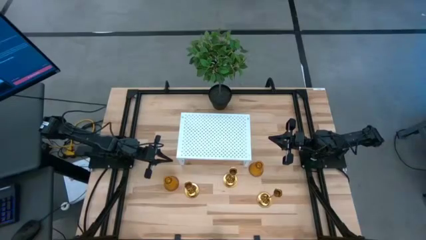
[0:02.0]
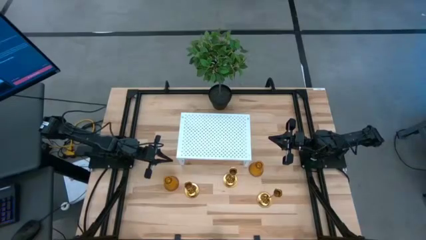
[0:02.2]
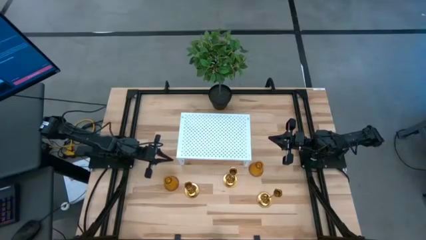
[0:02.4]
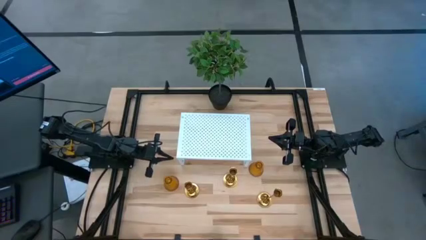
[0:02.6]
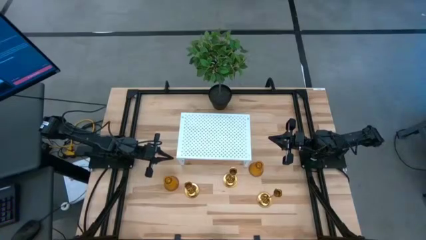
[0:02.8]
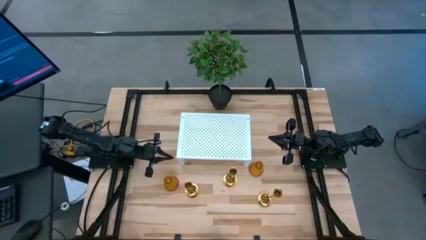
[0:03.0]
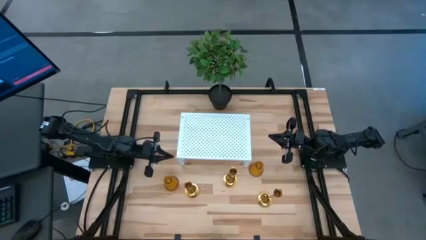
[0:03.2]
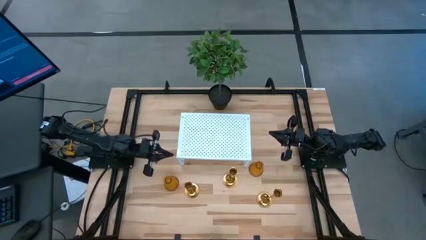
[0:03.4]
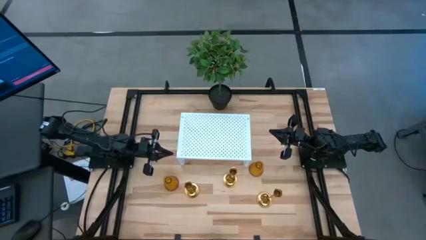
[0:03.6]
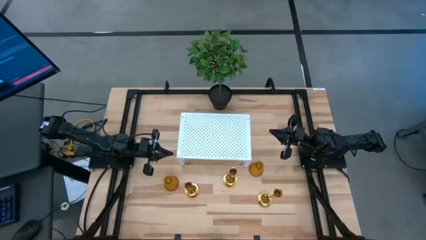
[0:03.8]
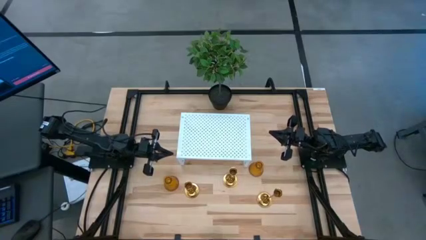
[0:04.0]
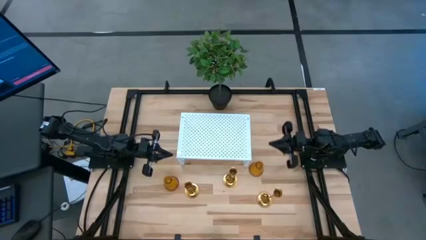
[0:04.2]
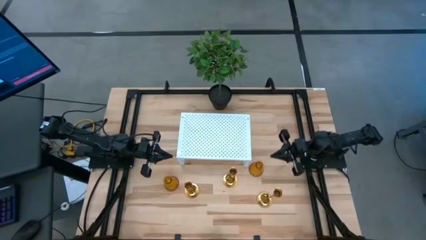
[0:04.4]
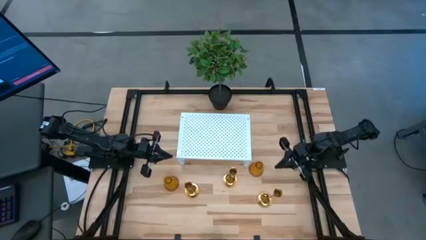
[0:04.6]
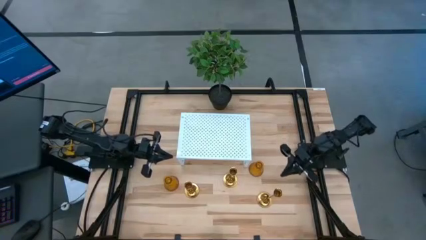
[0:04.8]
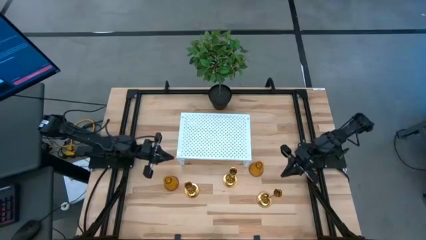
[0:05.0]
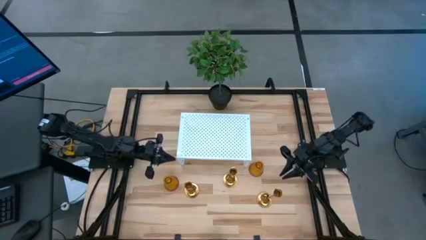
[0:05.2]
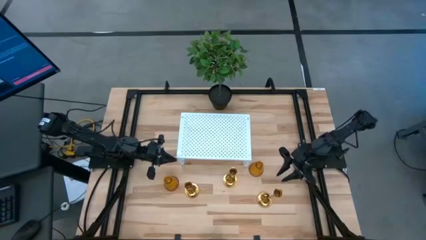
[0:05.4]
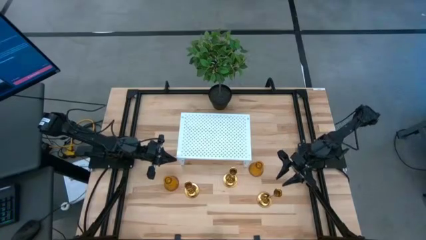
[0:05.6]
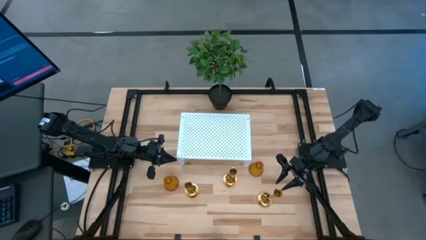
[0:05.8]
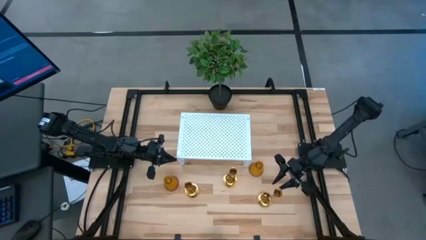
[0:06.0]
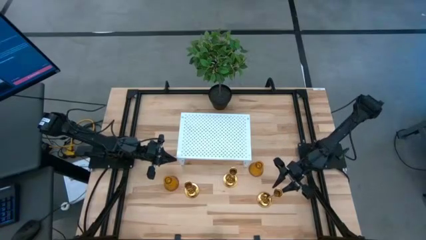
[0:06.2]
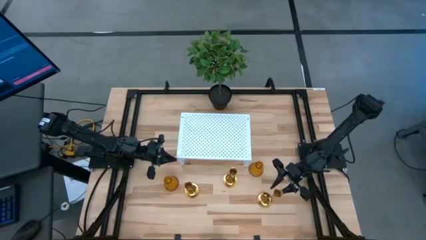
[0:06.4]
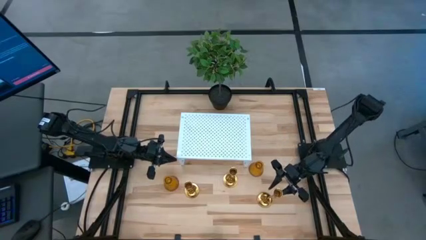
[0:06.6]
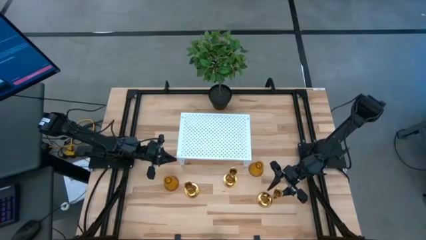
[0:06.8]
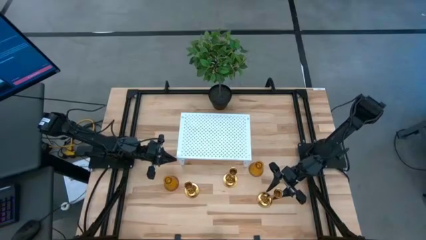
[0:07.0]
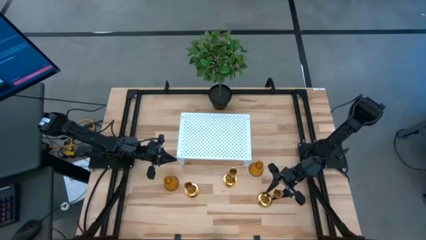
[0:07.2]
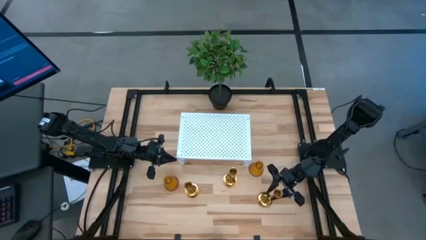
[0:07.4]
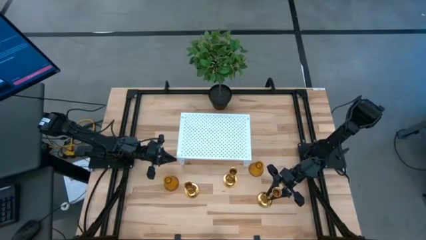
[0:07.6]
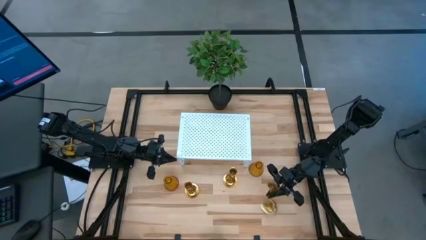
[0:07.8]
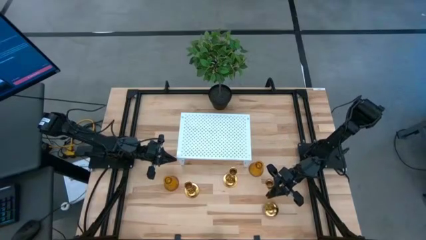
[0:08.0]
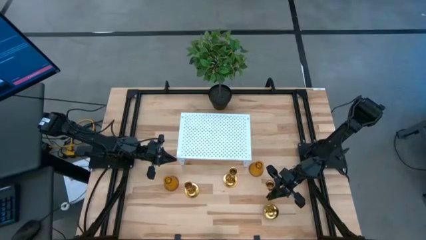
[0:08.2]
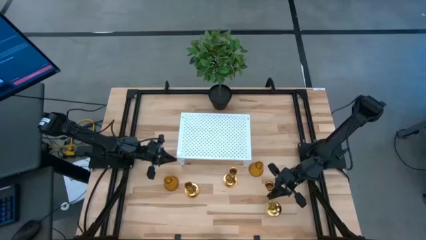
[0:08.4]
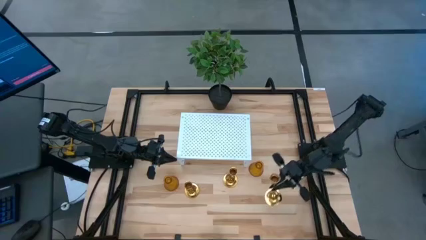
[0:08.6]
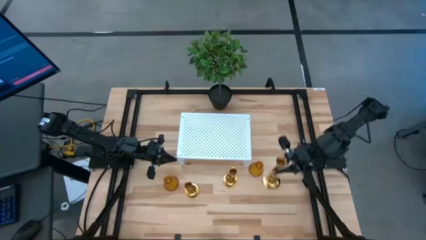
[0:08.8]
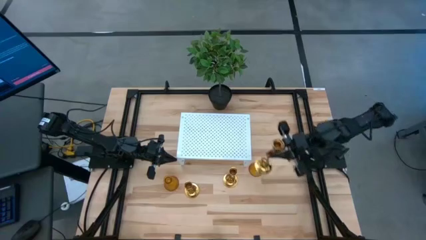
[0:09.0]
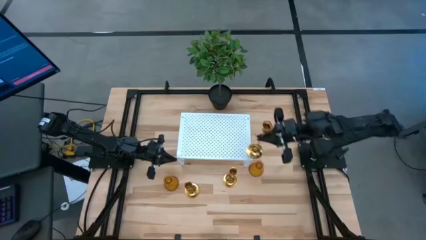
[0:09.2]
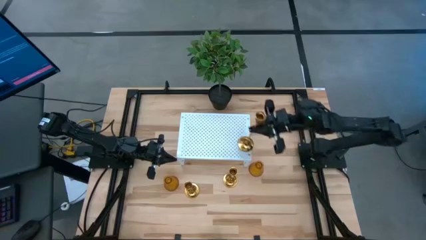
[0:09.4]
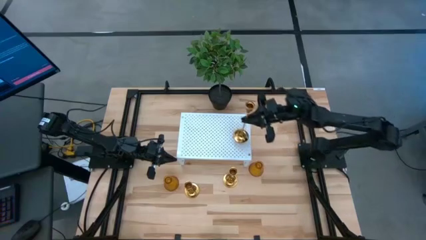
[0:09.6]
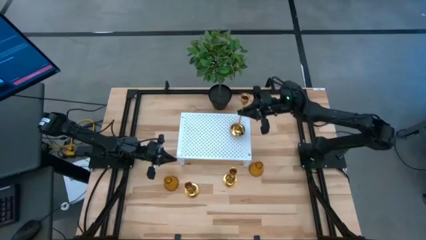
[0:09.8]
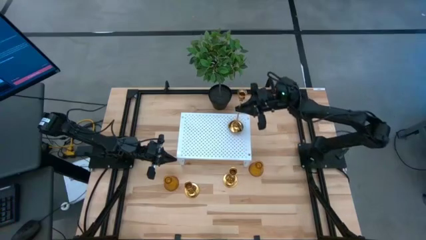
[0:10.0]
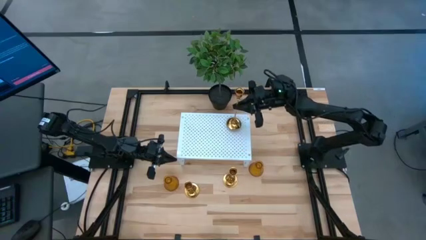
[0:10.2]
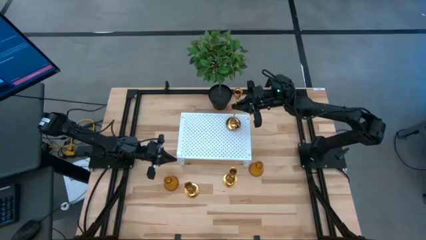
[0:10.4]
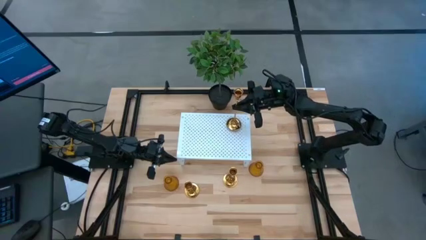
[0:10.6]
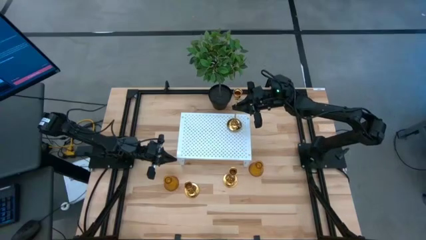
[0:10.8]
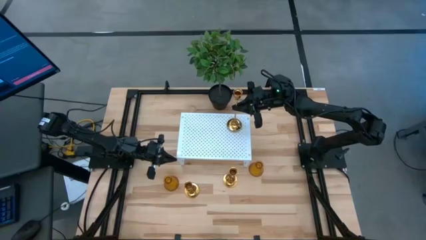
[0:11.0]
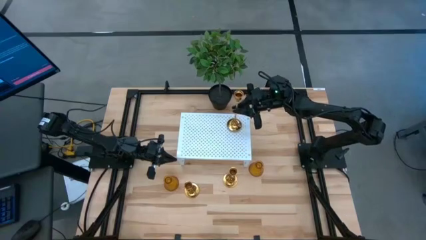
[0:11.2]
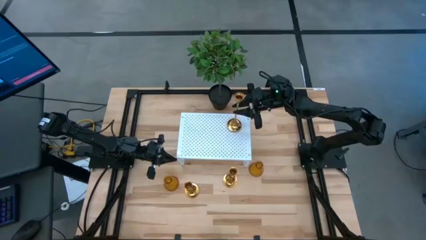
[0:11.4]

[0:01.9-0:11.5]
Task: Pick & Place candle stick holders
Put the bottom right gold candle holder on the shelf

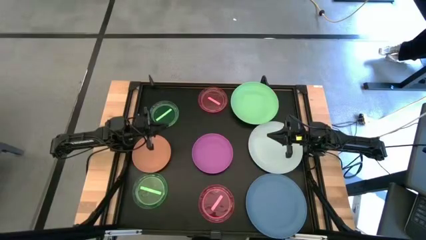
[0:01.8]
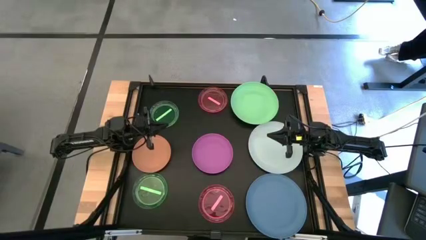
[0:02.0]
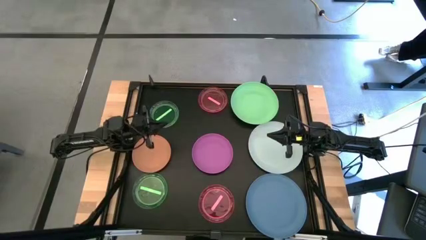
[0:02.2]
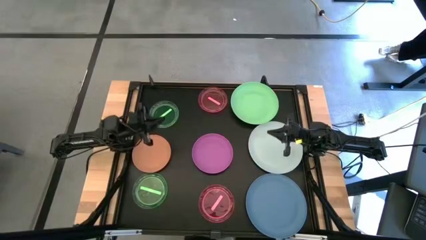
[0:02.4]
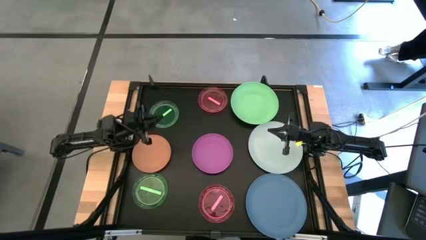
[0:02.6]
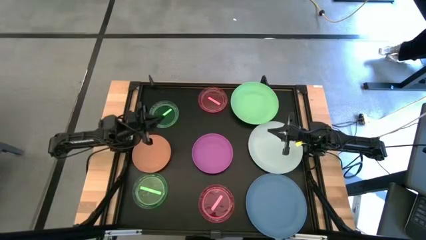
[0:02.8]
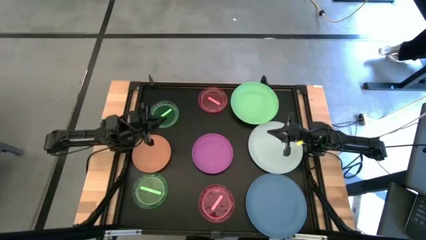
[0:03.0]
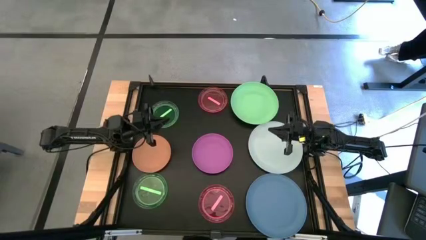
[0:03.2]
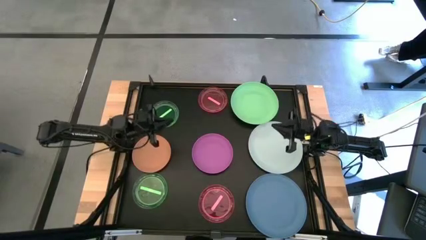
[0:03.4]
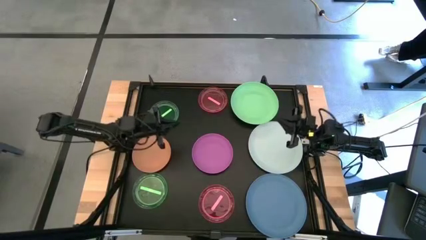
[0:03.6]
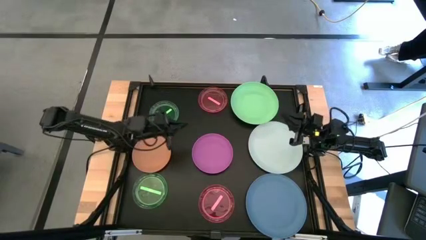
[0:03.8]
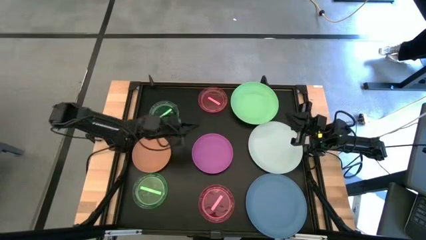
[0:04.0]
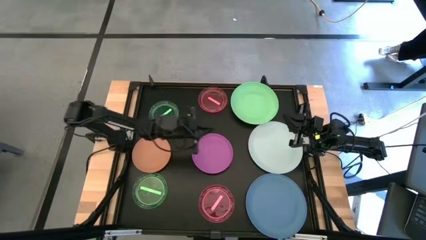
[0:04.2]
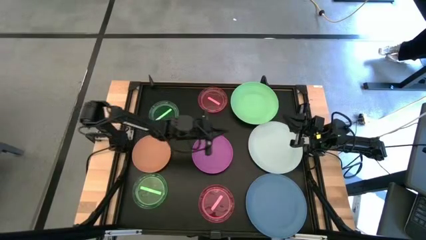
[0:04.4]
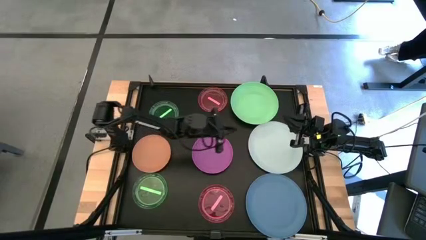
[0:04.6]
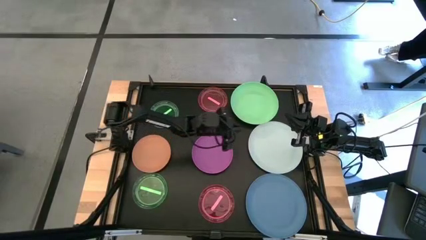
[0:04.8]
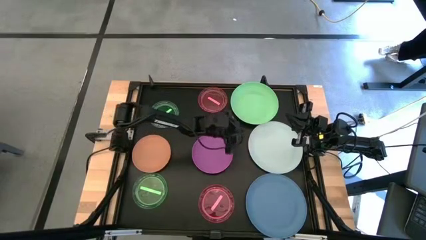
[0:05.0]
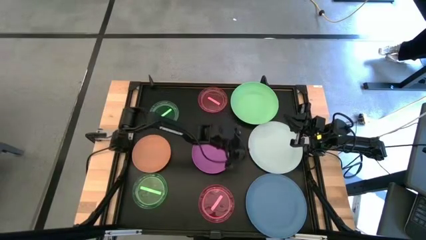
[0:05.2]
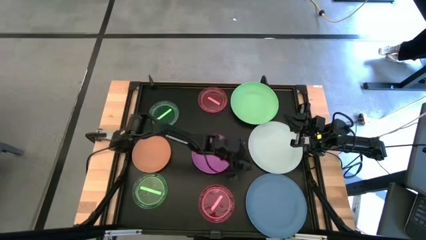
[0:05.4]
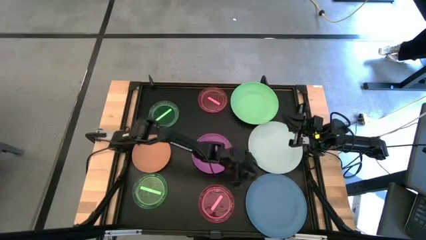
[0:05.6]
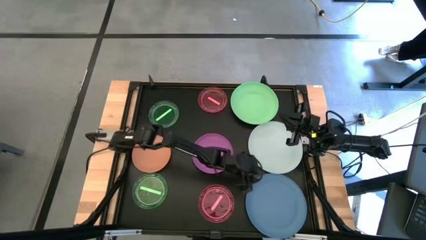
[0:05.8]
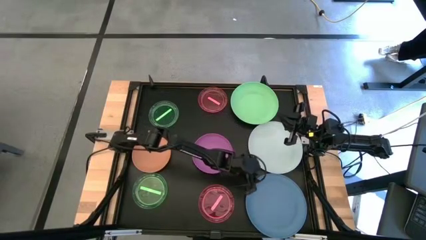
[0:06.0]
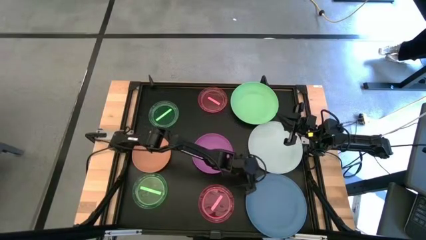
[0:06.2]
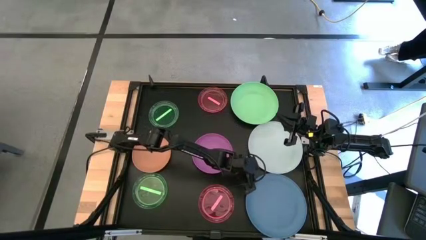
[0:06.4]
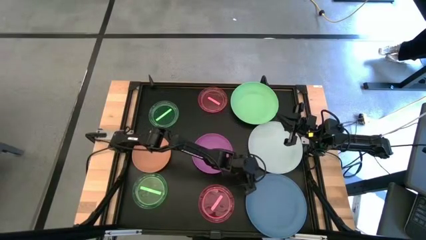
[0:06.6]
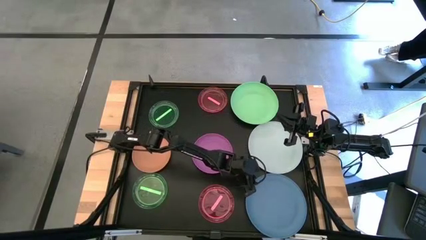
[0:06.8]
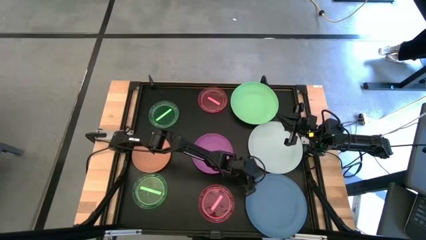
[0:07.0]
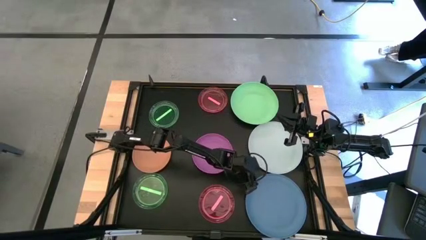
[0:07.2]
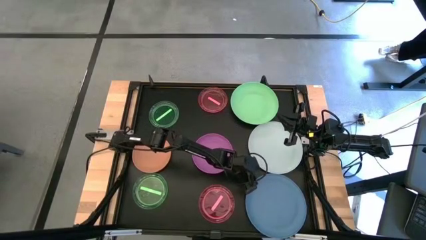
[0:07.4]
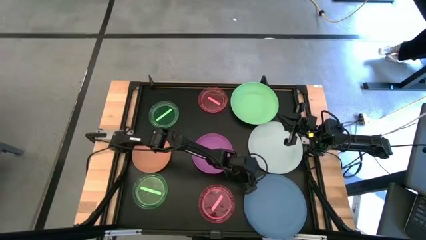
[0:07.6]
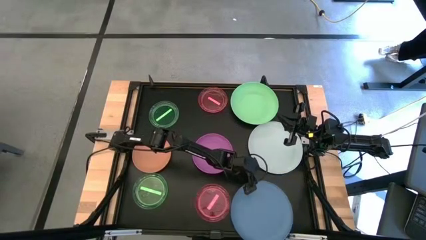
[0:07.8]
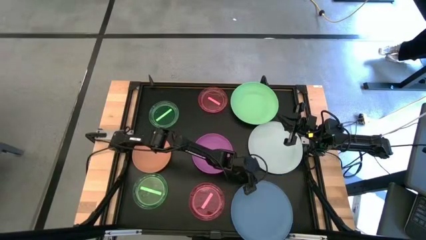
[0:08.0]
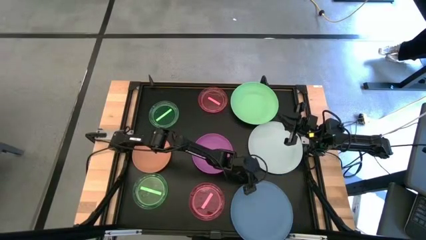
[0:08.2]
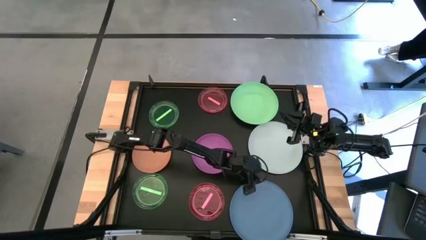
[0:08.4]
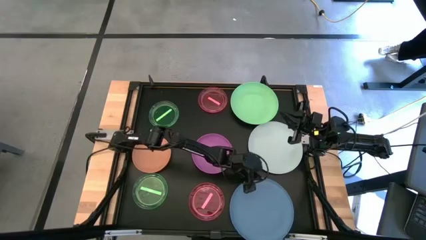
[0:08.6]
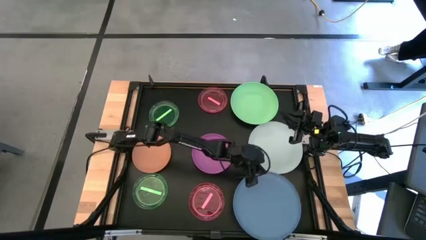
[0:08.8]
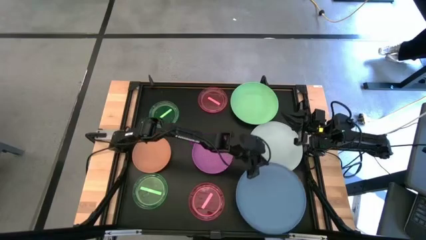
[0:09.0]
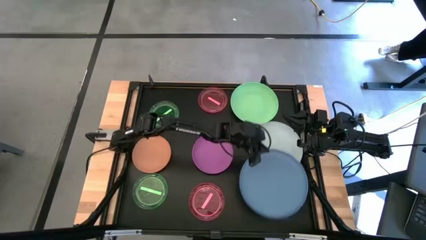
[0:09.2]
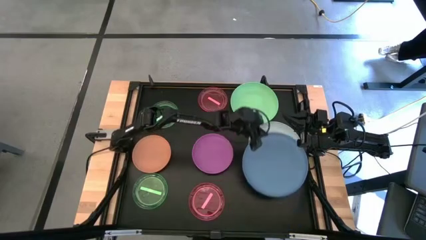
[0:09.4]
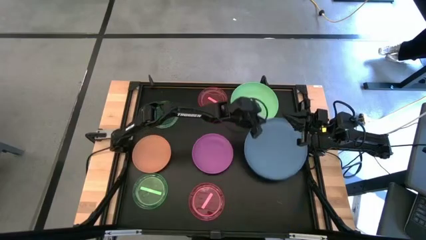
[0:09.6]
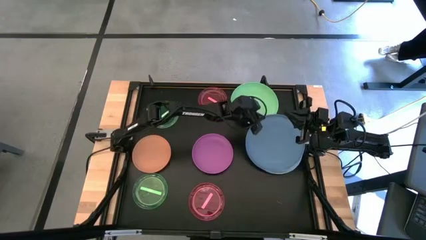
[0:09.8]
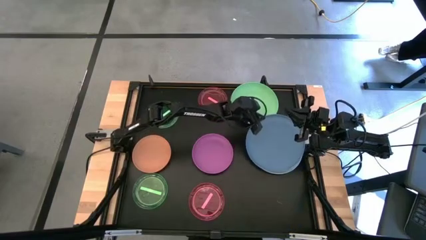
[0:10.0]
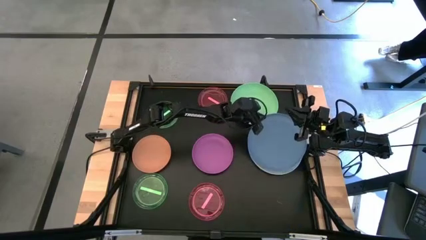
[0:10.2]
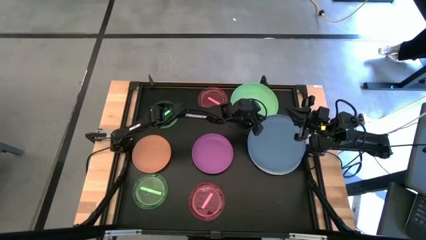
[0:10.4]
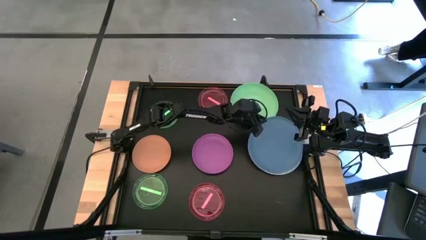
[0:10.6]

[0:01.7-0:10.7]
Task: Stack plastic plates
Stack the blue plate on top of the gray plate
